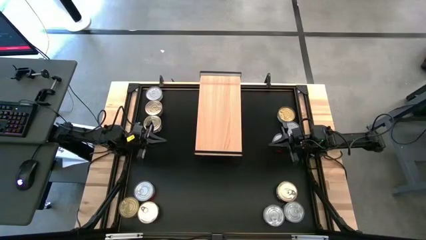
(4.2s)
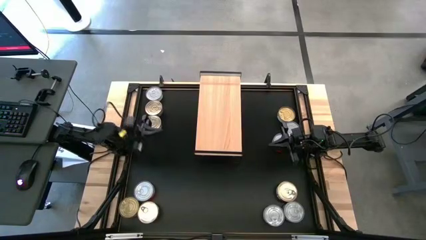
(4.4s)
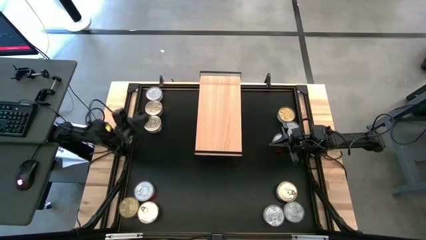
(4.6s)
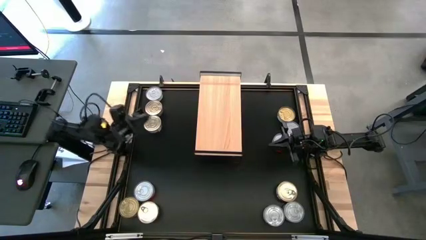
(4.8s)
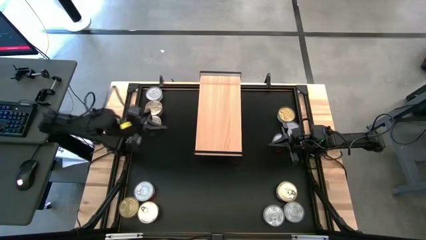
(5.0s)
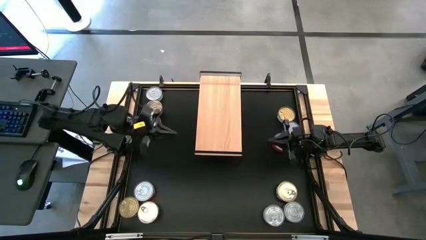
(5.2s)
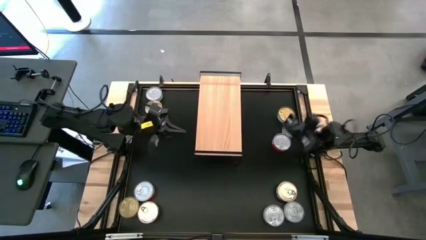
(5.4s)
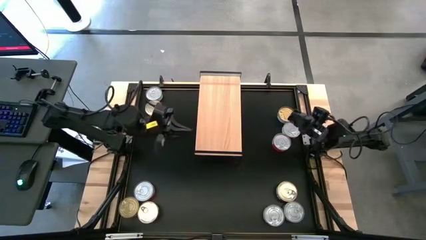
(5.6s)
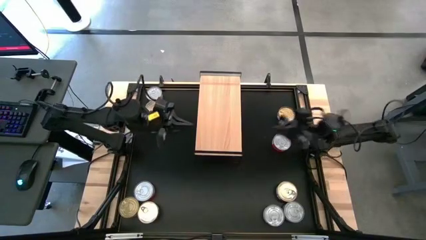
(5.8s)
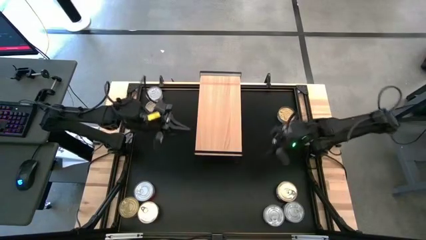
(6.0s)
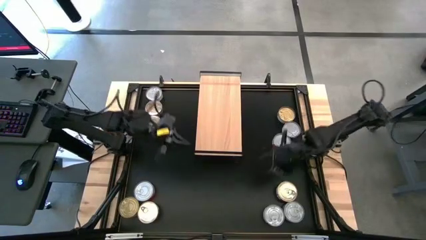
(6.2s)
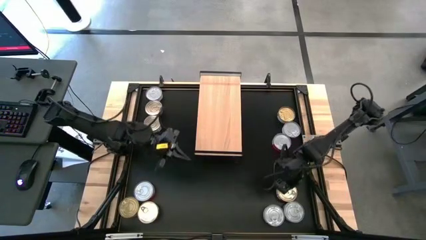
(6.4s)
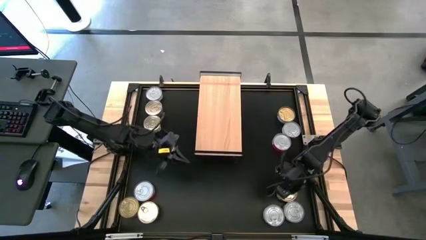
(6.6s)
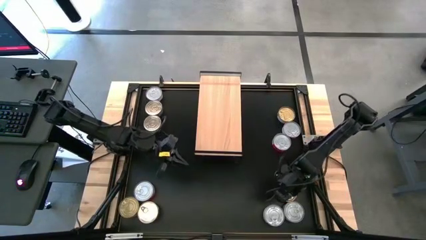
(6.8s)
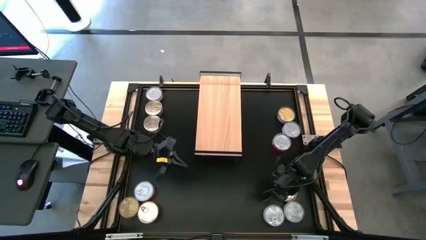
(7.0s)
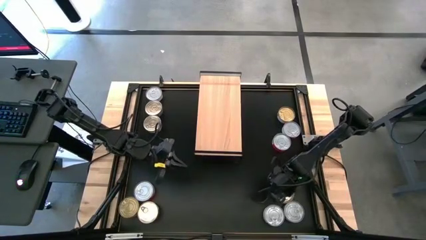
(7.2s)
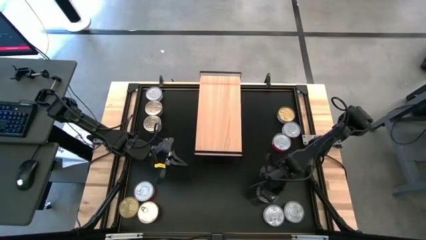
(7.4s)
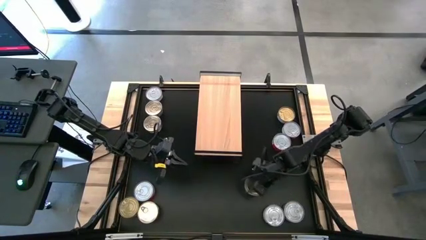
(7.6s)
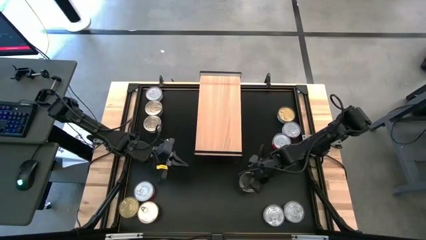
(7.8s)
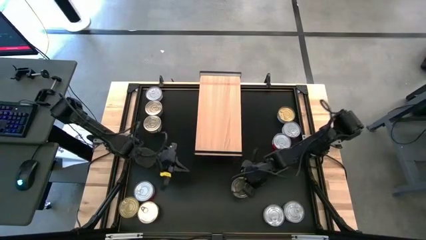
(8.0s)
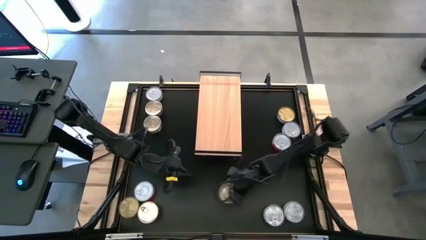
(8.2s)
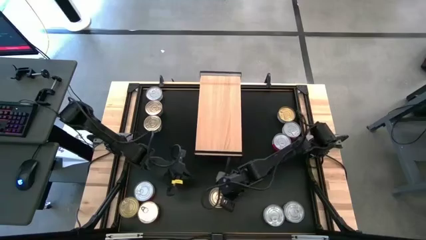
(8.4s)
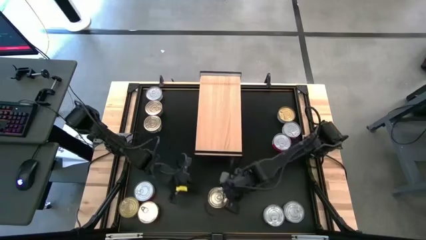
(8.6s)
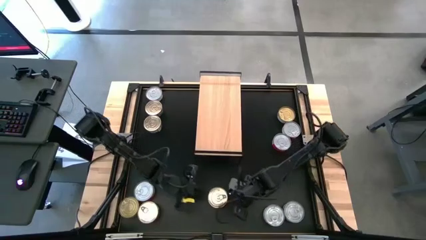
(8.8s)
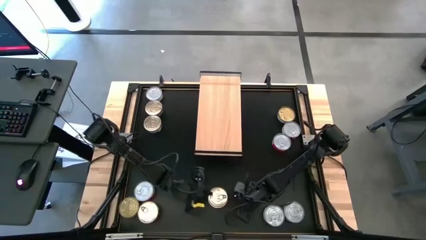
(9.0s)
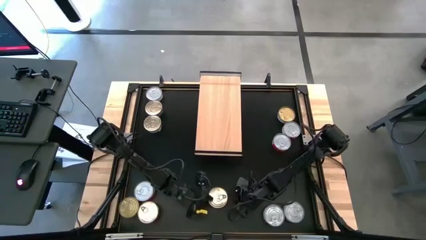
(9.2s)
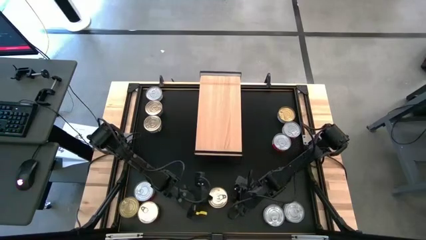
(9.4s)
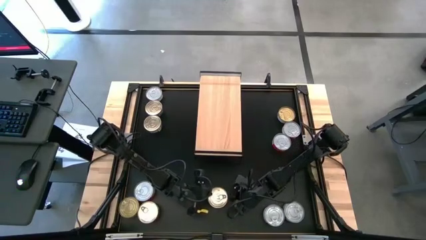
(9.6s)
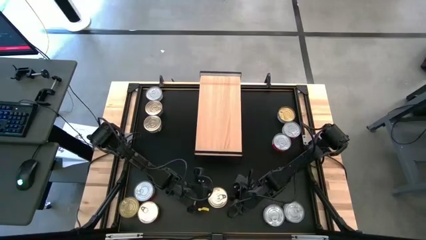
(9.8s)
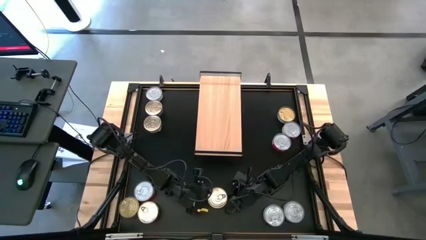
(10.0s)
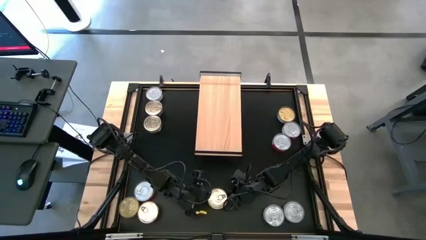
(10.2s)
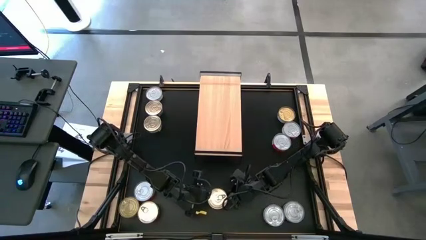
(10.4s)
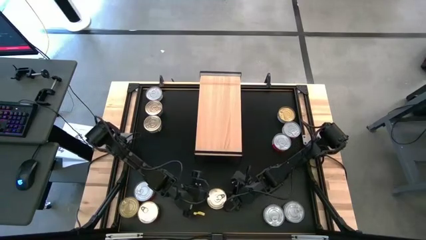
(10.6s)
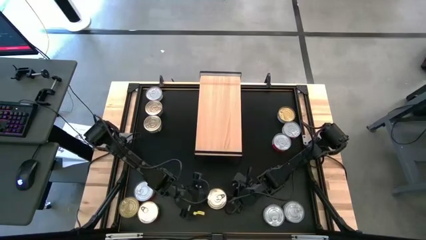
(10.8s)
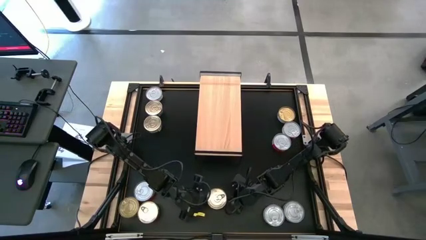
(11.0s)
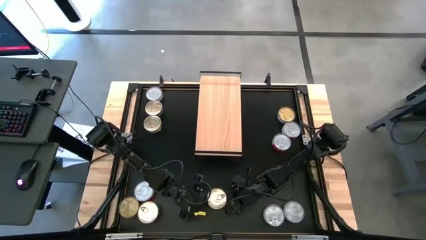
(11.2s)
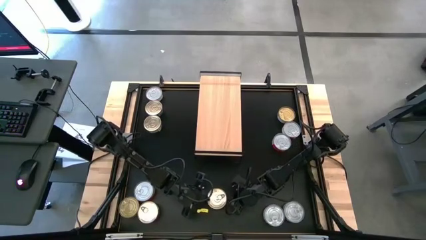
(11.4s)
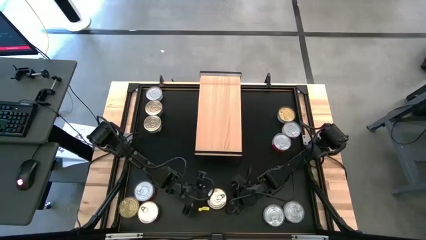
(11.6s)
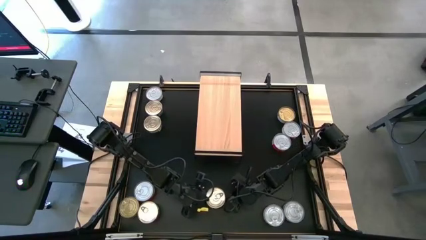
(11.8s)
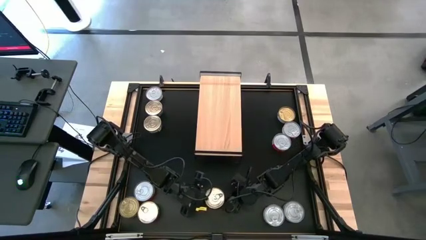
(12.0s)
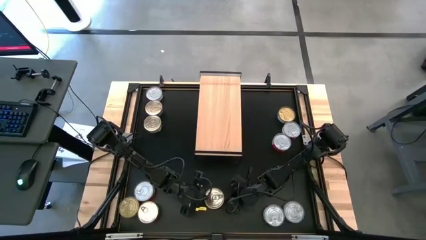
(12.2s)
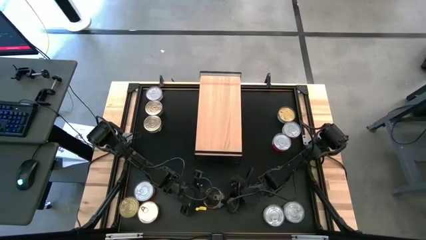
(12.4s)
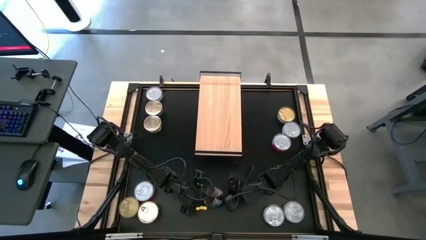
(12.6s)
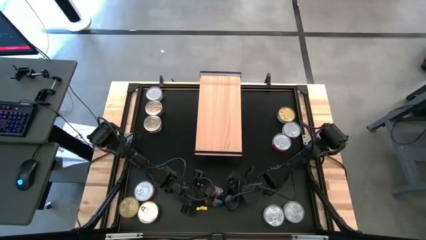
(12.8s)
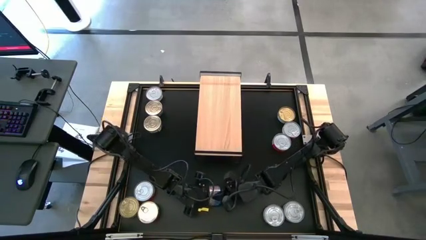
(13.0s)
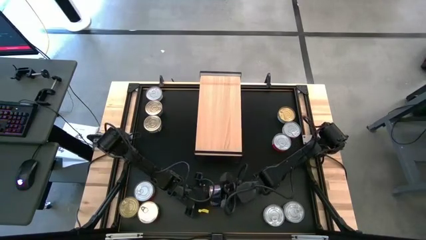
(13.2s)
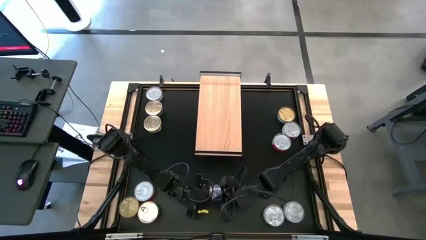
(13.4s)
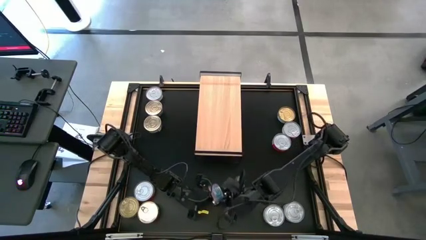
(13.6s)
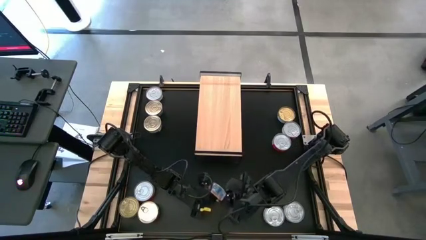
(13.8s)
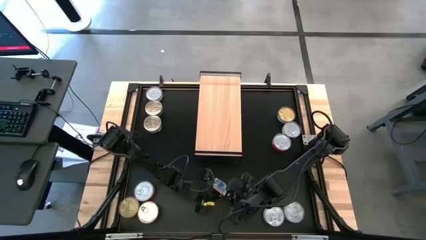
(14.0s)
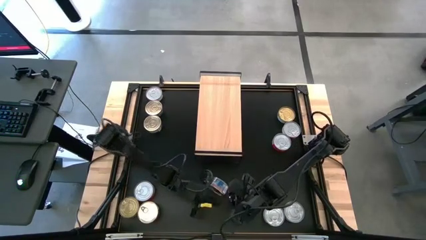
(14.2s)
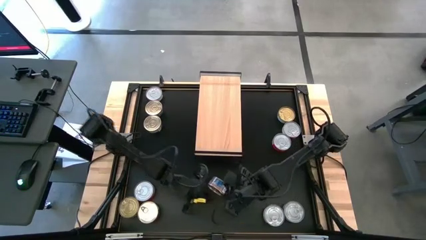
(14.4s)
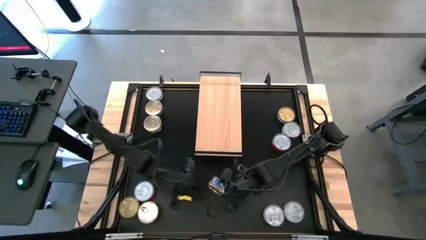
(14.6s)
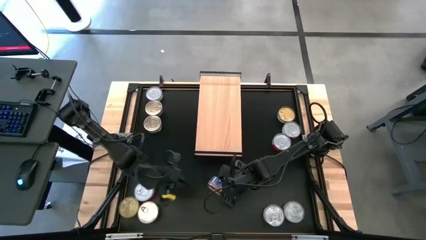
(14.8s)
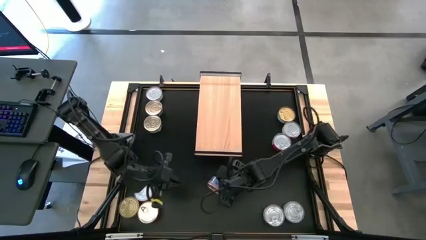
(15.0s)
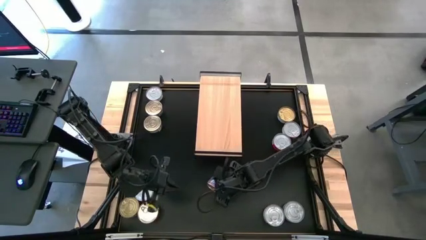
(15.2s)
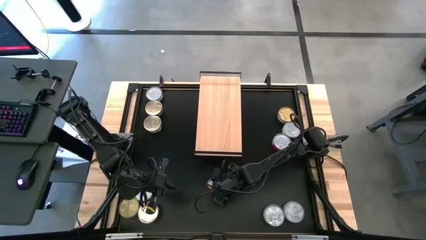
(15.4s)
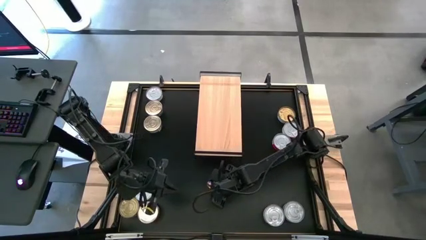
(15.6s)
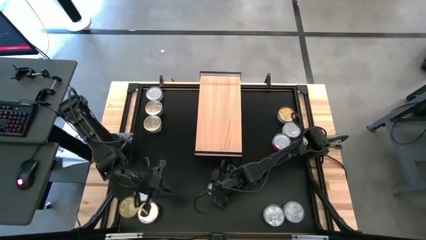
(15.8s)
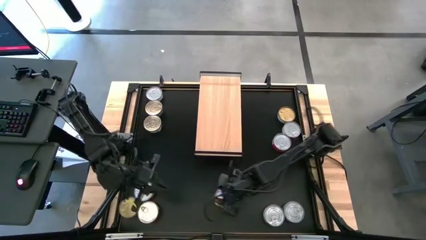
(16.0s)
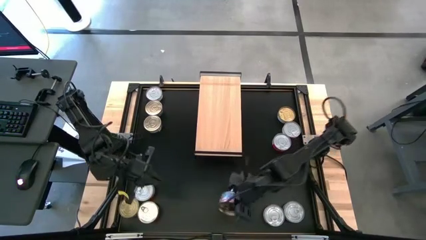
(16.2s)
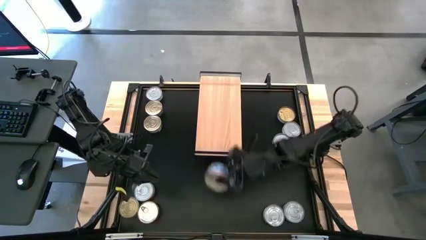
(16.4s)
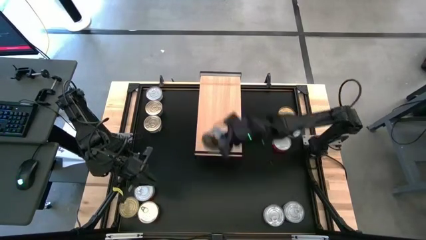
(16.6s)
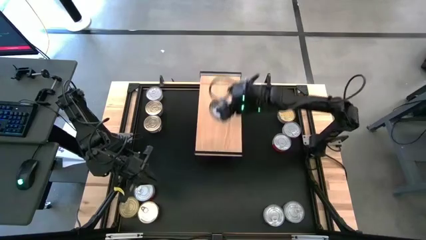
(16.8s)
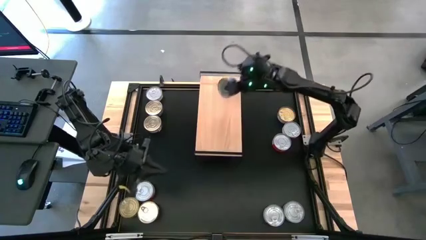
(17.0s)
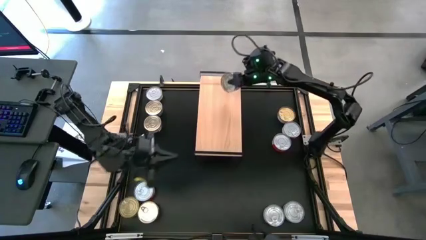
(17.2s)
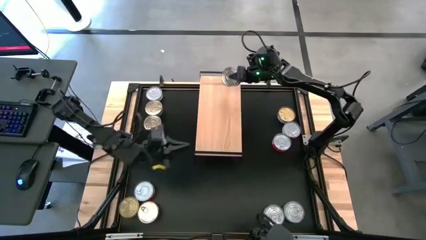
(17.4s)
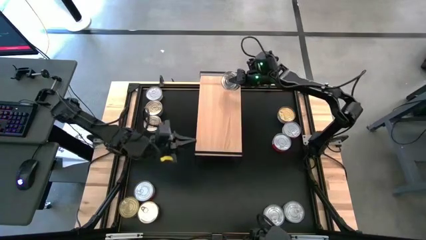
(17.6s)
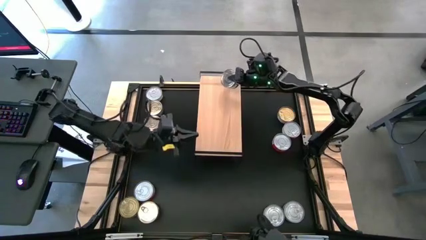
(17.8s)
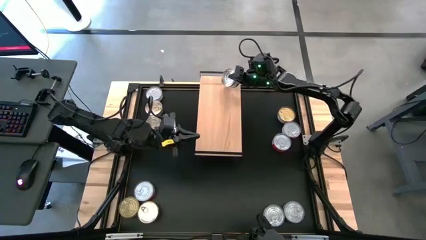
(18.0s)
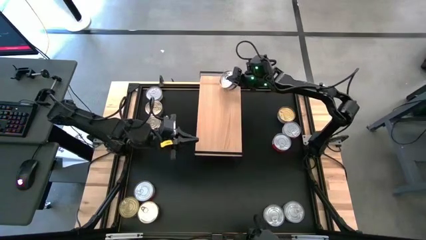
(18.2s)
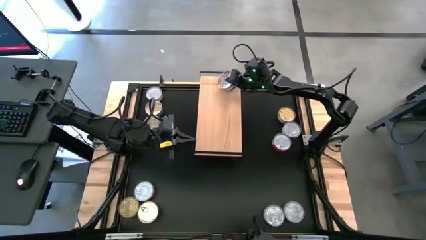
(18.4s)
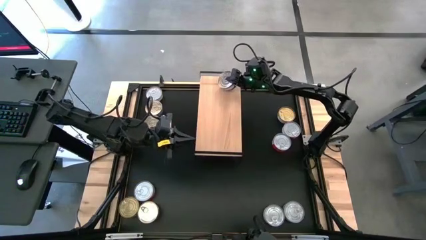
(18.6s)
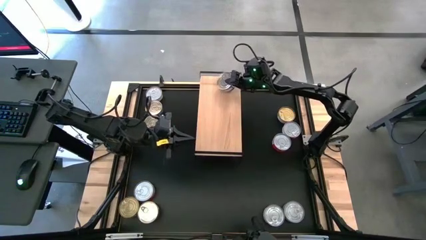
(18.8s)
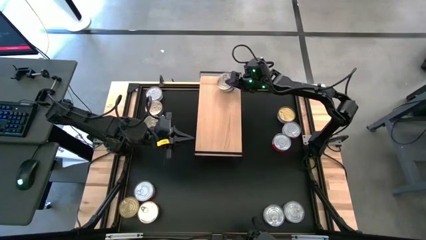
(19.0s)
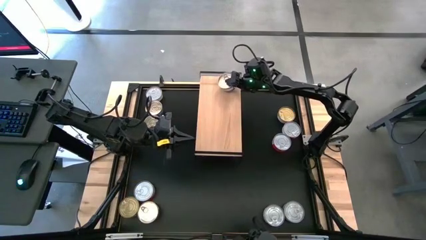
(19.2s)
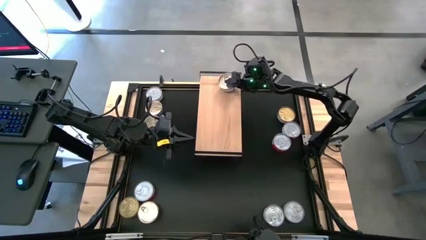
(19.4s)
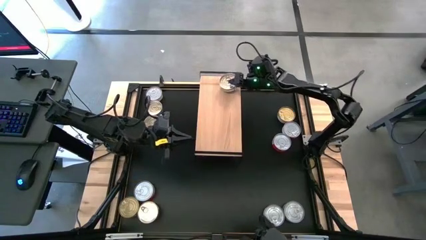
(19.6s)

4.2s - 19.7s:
Task: Stack canned seafood by type on shelf
Put the blue-pink tuna can on the shelf
